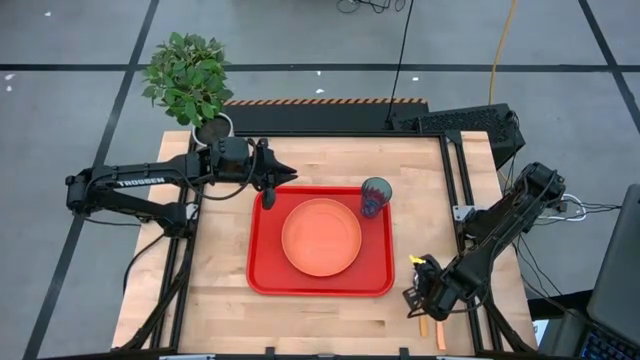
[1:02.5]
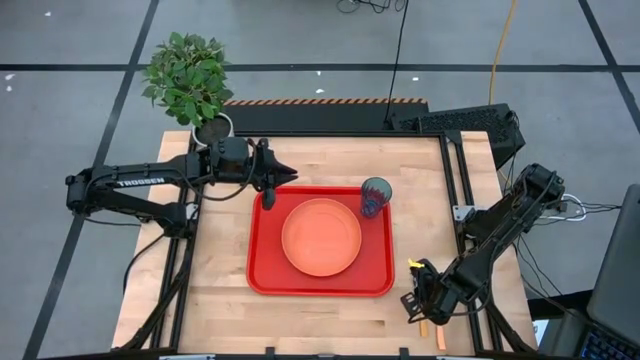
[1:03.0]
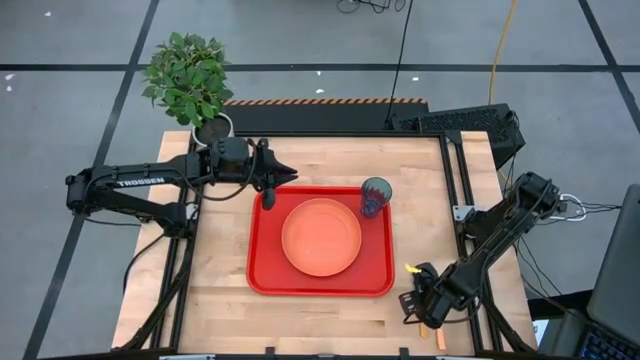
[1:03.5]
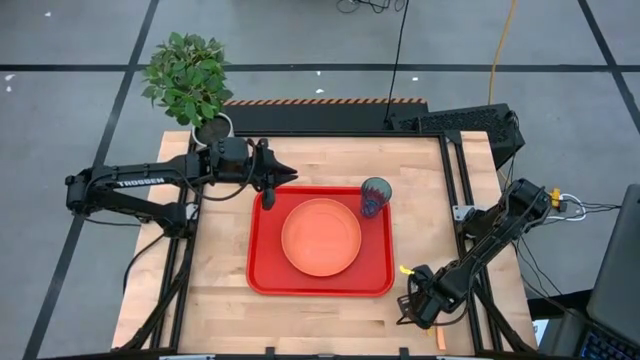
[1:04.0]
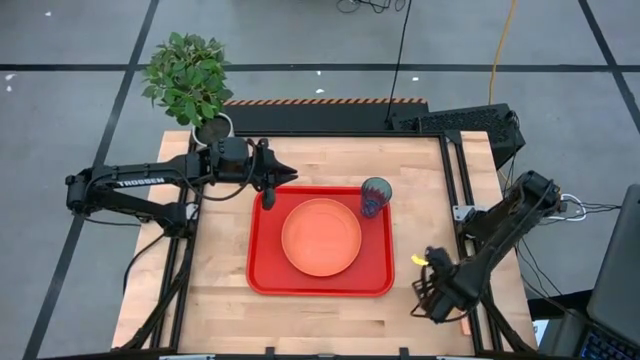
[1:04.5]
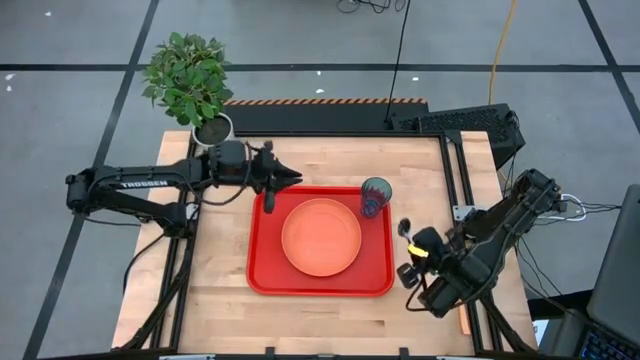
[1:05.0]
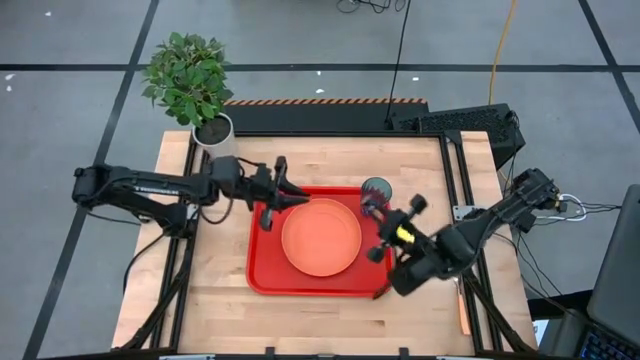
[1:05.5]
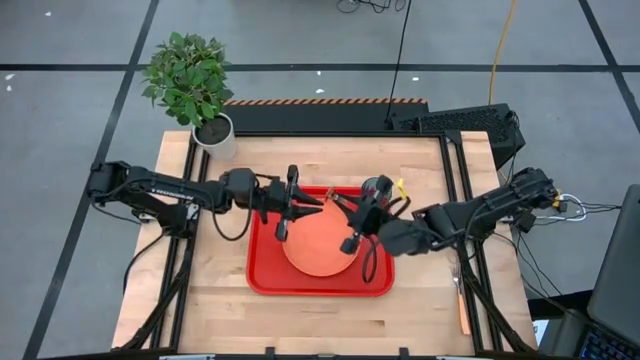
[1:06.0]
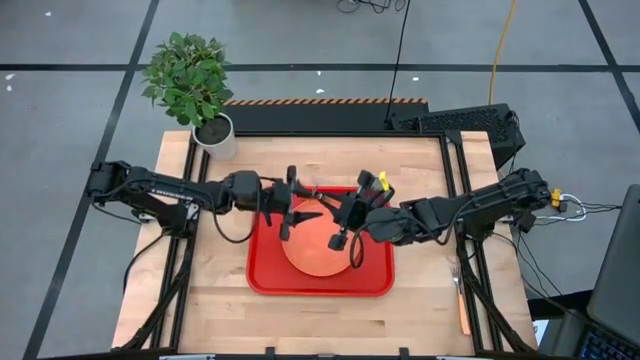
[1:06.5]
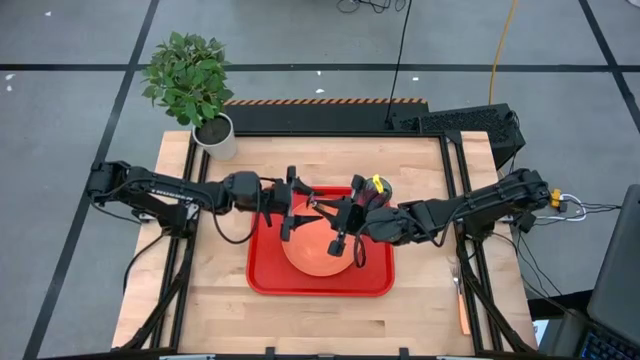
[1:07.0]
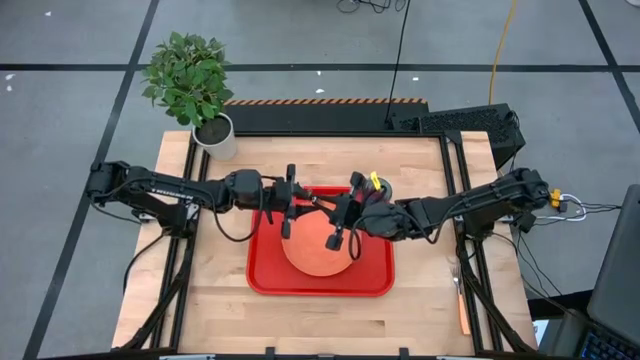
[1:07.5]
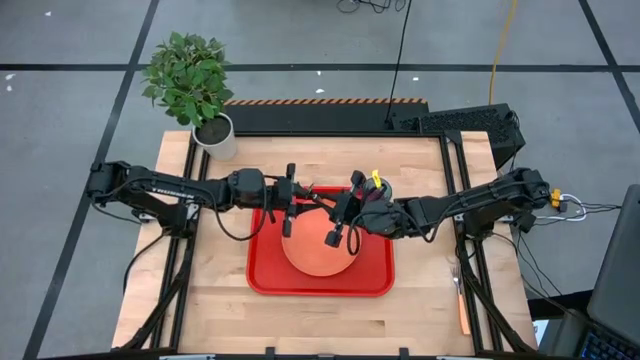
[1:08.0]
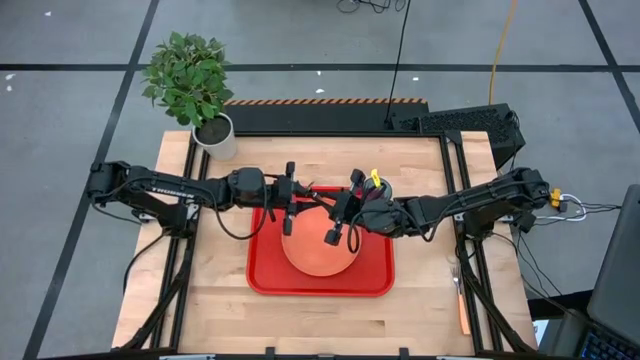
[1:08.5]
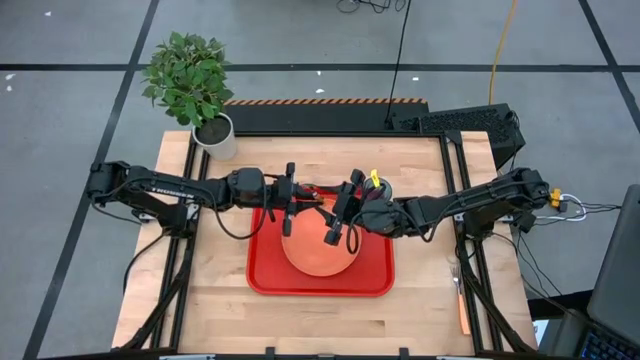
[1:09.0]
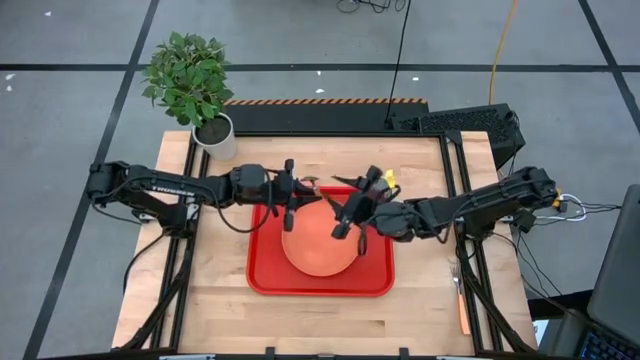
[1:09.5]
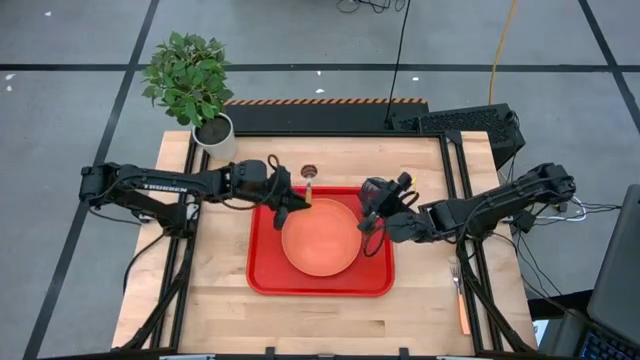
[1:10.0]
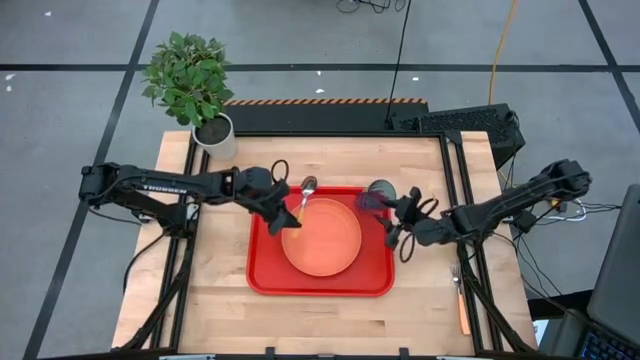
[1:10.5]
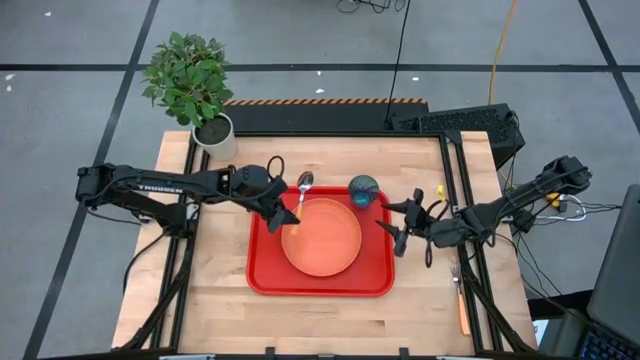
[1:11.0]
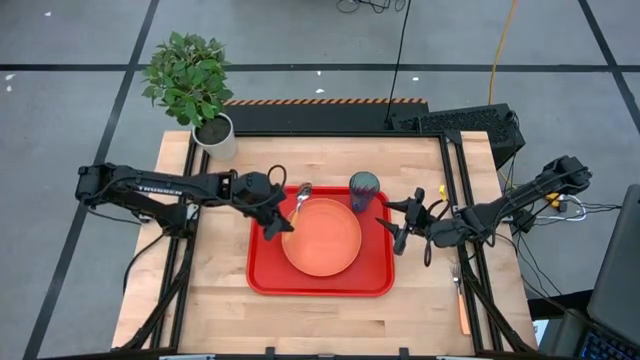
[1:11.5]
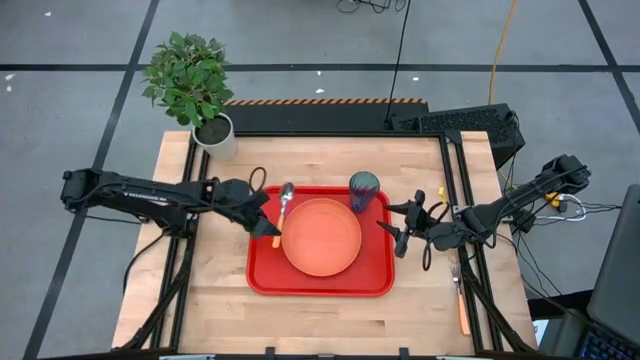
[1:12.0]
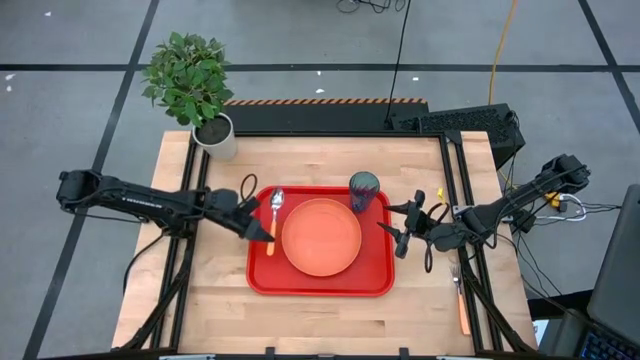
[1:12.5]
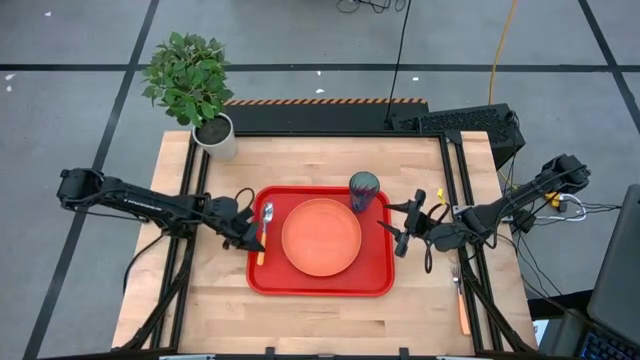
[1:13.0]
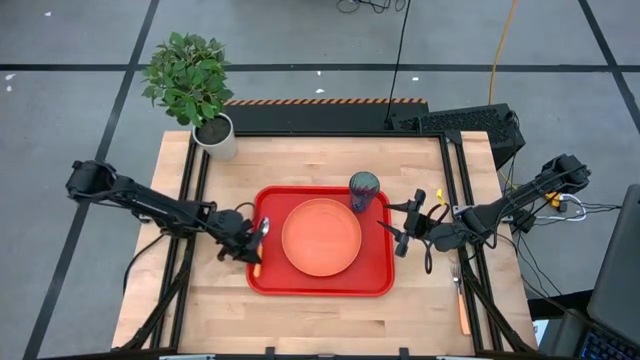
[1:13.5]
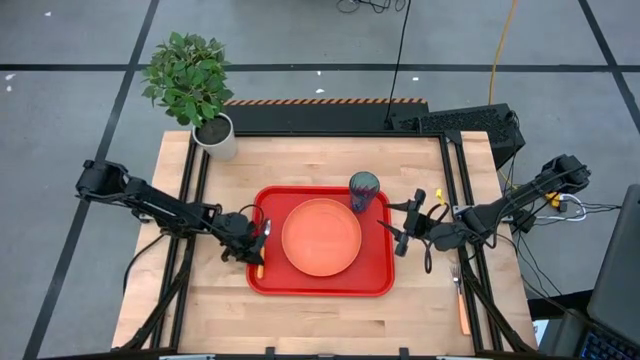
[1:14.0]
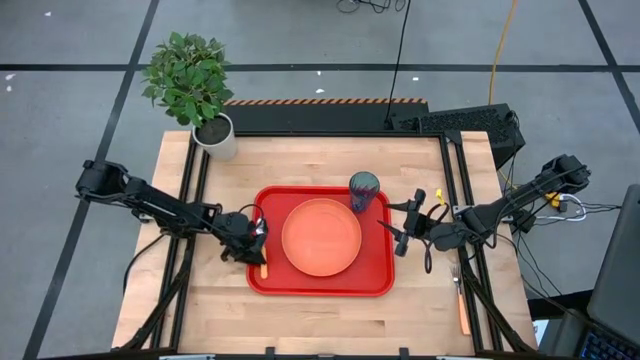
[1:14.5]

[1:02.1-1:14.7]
Task: Pick and place plate/cup/fork/spoon on tray
Put the yellow spoon on the red tray to the left of the orange plate

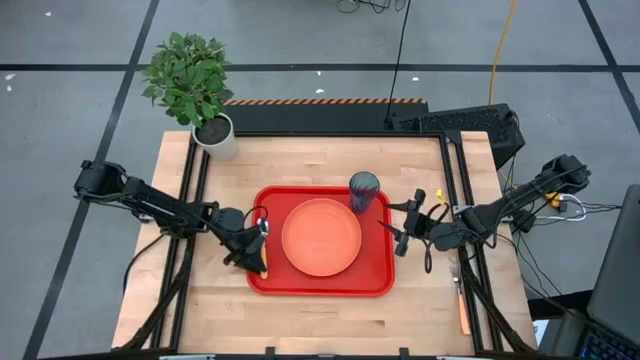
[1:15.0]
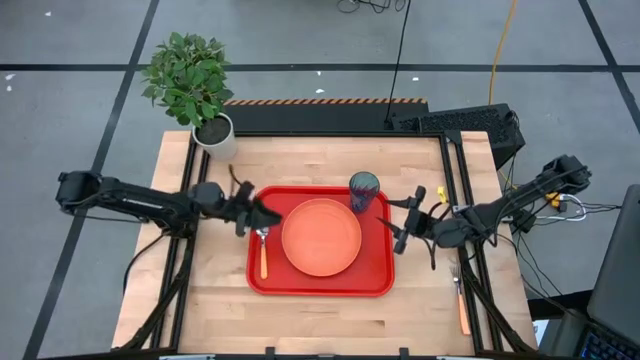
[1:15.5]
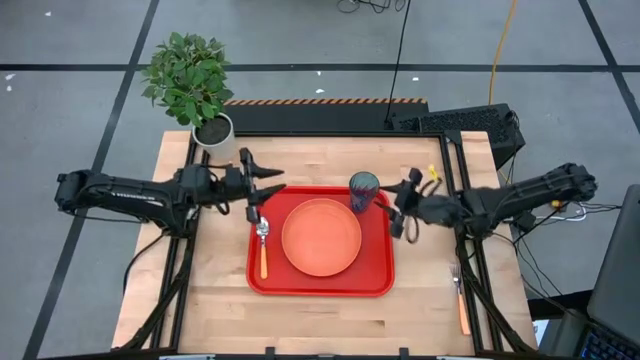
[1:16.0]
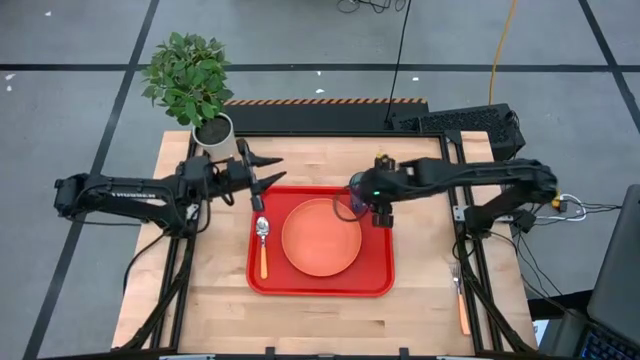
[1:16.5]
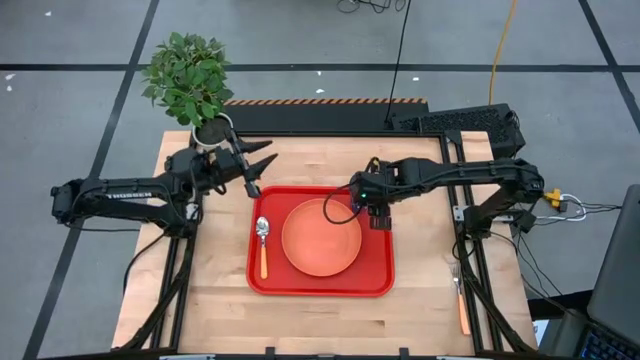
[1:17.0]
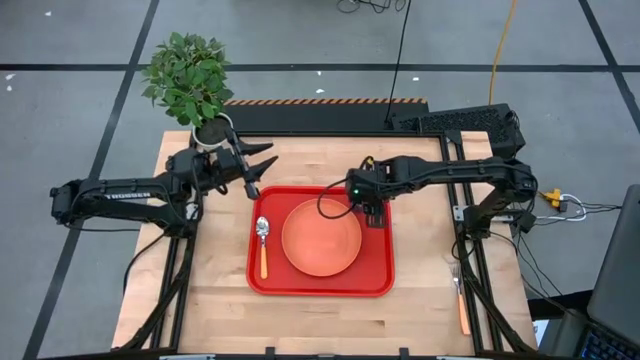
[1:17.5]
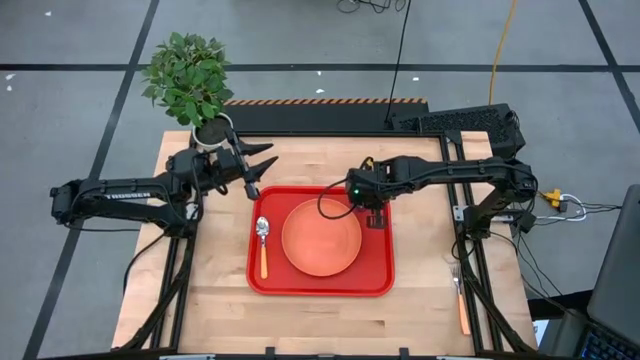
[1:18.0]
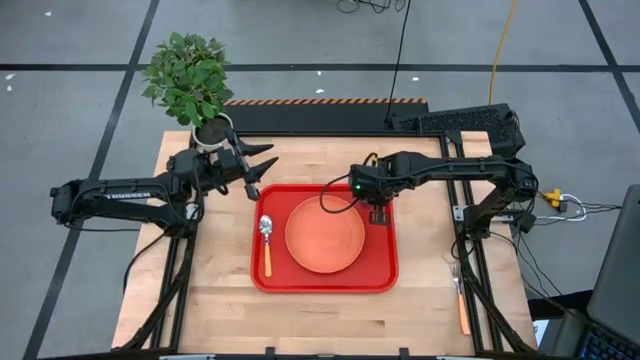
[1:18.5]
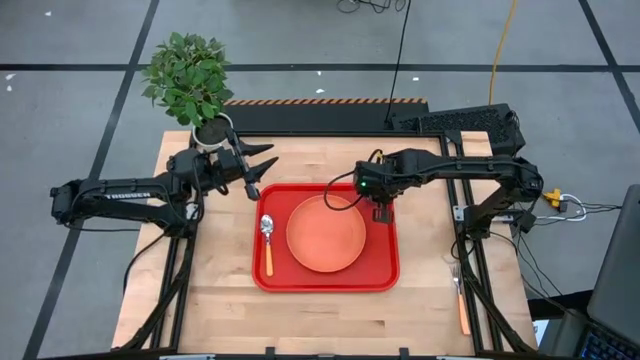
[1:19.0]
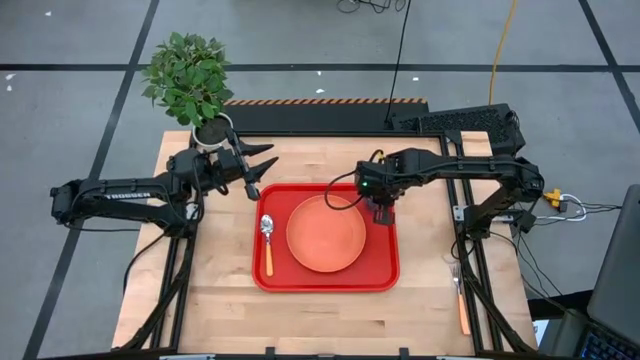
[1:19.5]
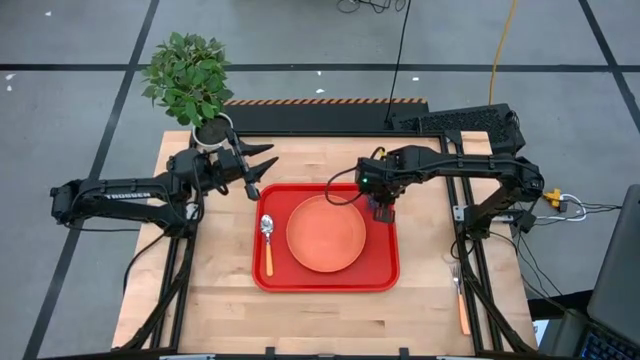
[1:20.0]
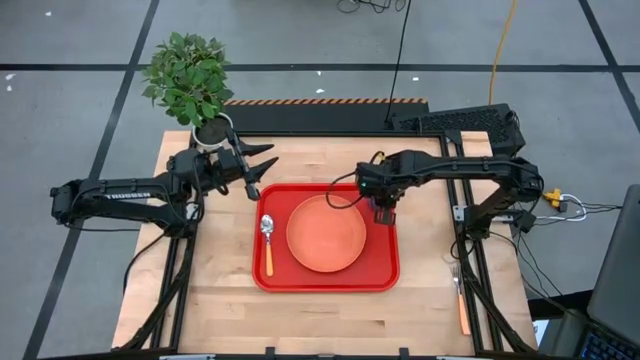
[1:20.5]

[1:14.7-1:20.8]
Adjust the blue cup on the red tray

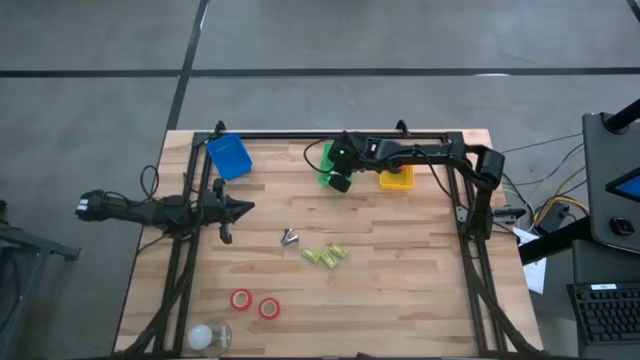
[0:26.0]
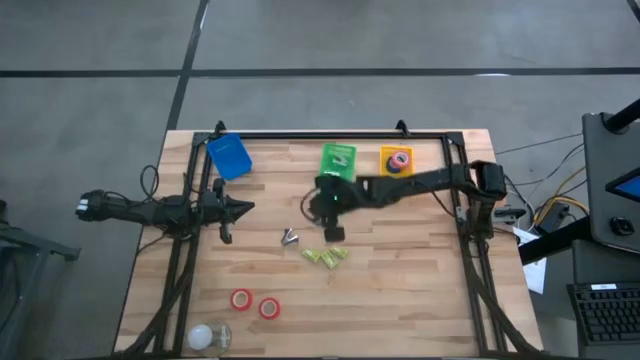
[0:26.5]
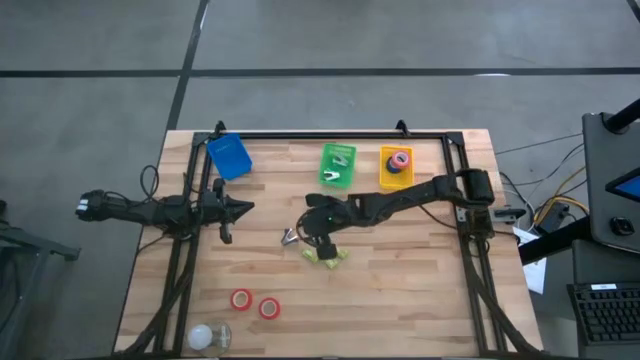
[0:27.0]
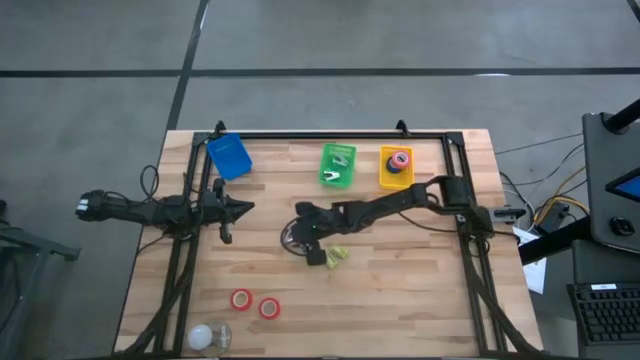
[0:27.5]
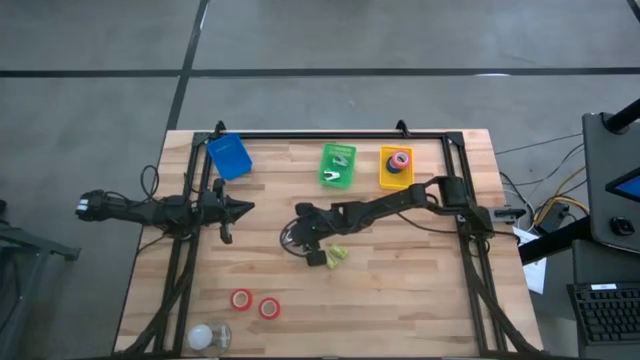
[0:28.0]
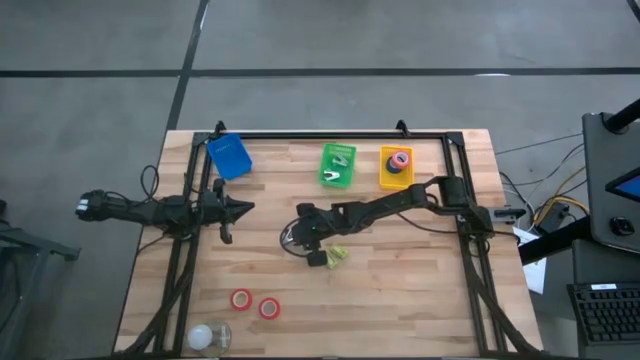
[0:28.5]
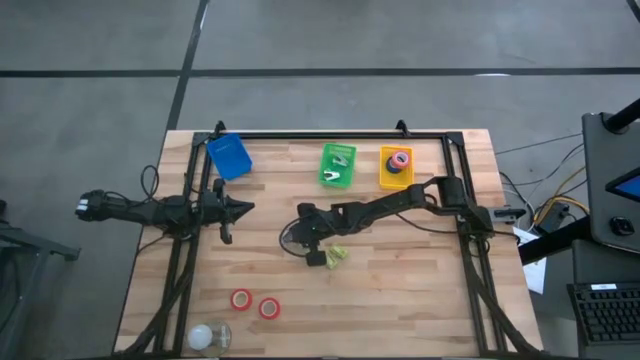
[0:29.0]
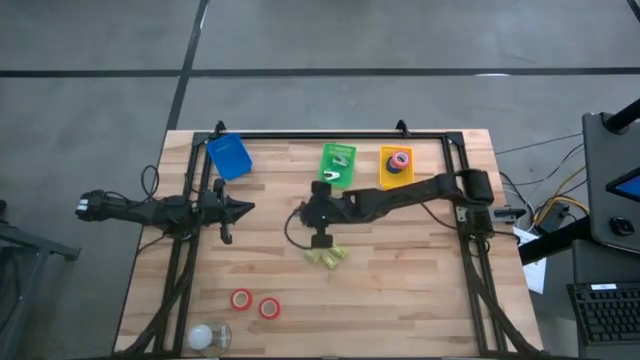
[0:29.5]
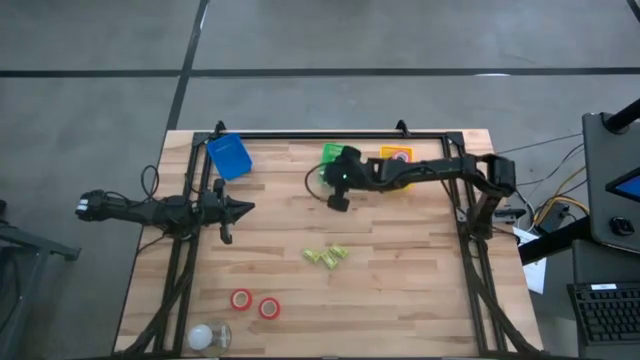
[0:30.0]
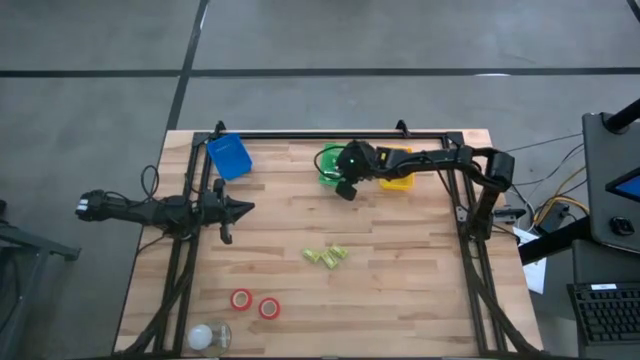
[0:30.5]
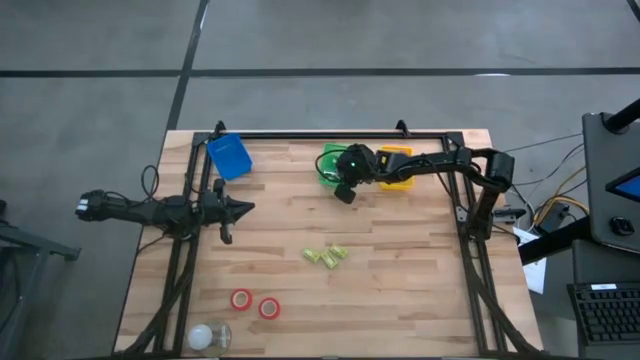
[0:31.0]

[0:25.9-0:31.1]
Task: Pick and place Stapler, Stapler remover, tape
Put the black staple remover into the green basket
